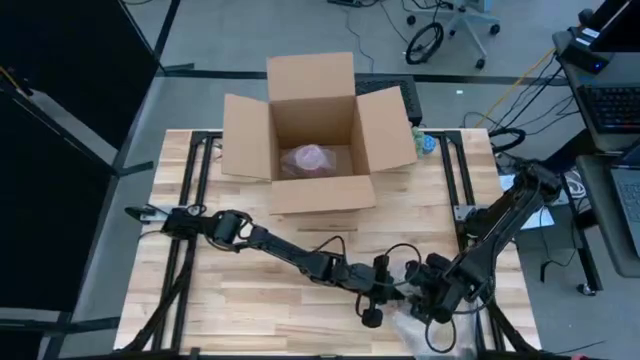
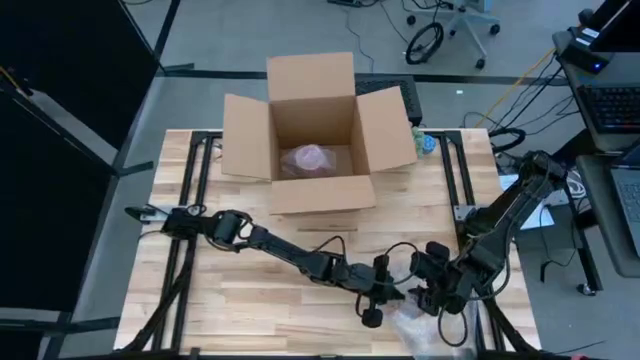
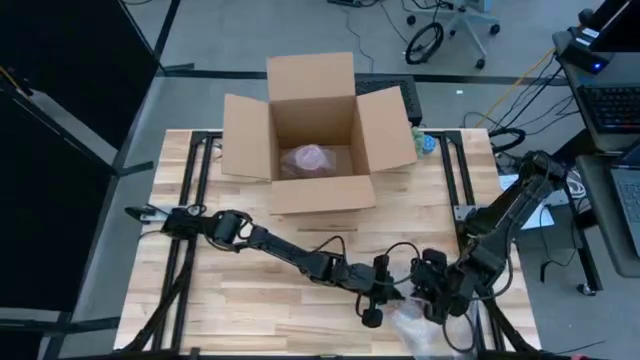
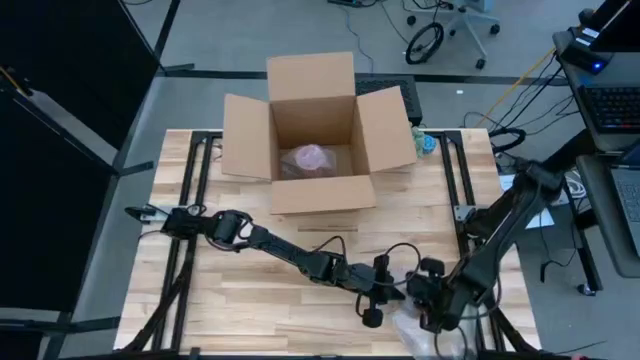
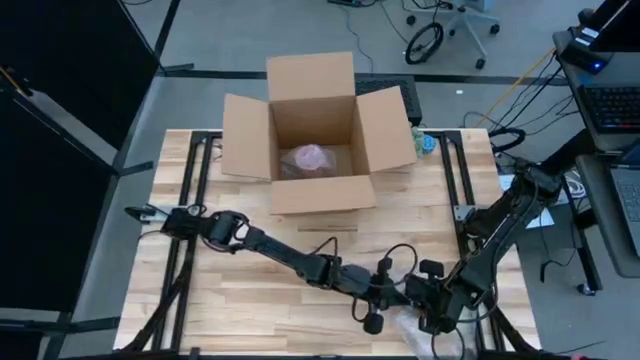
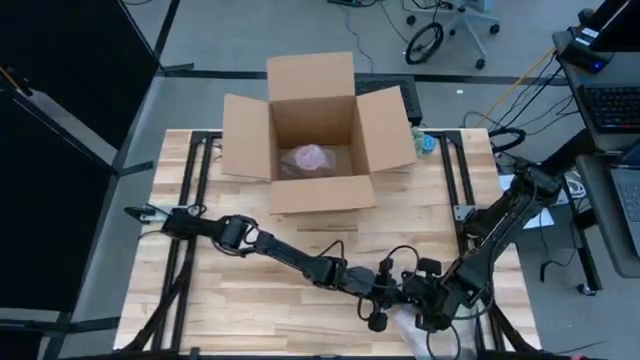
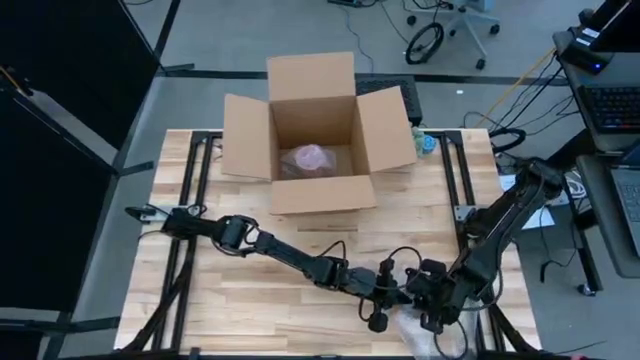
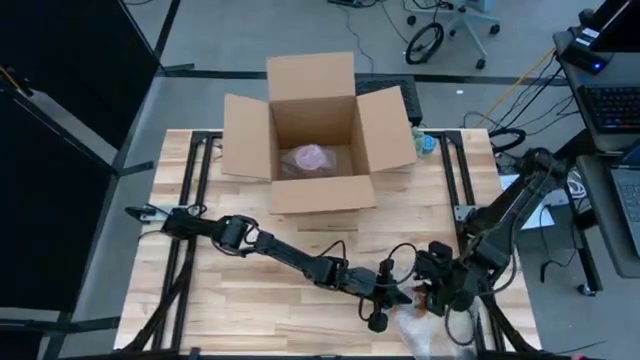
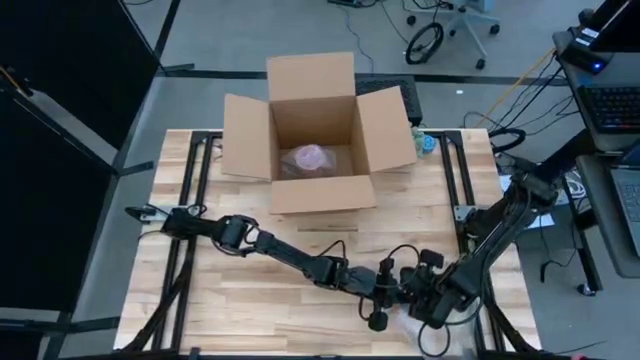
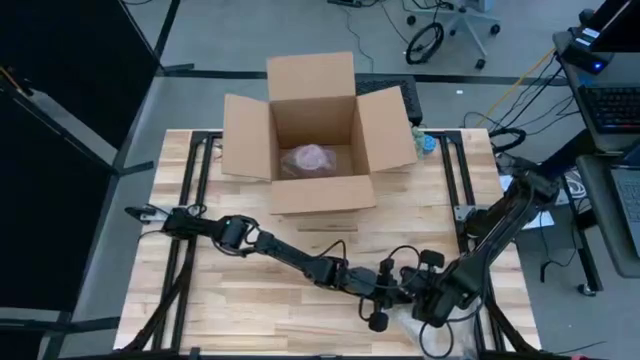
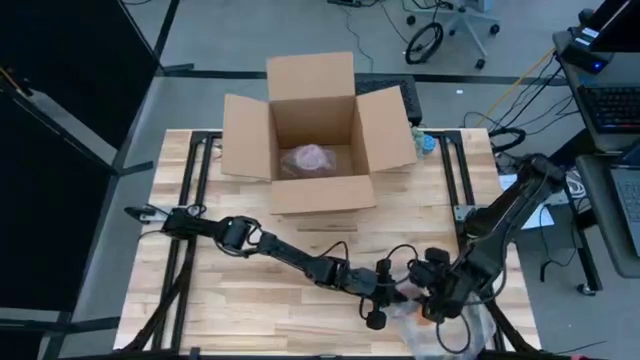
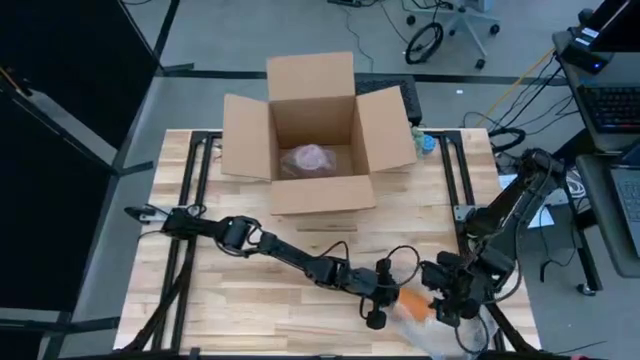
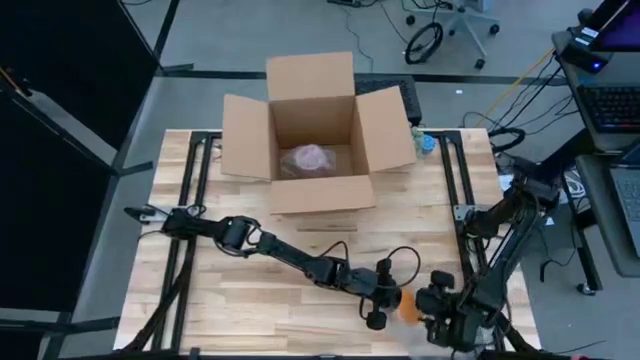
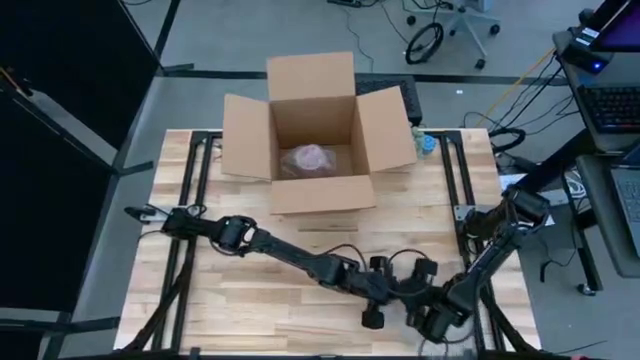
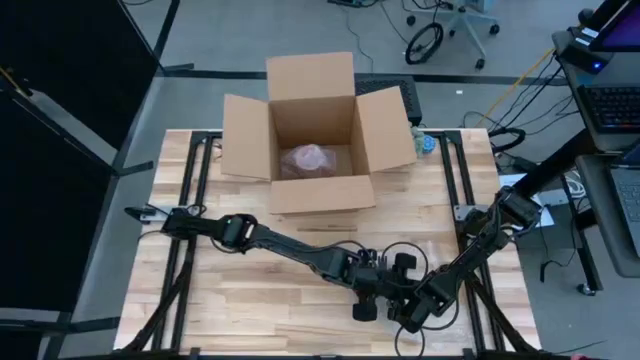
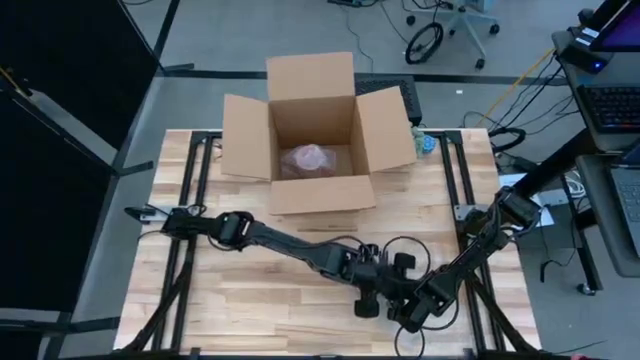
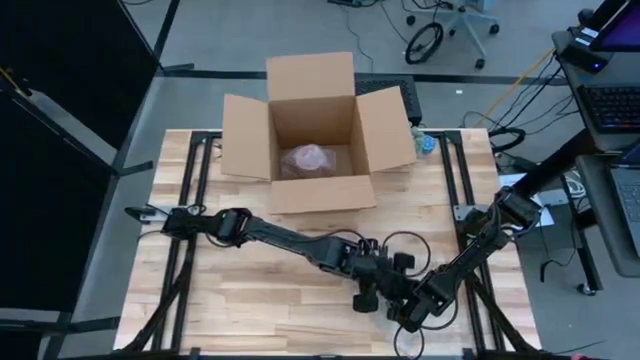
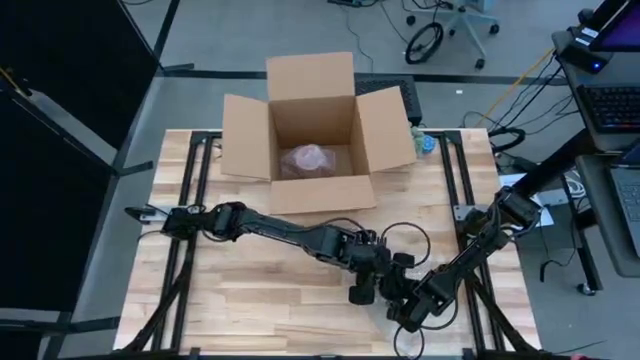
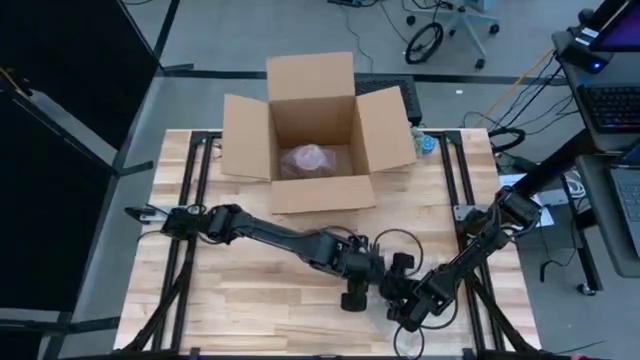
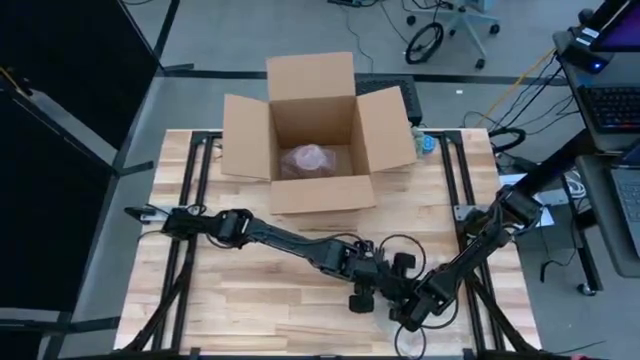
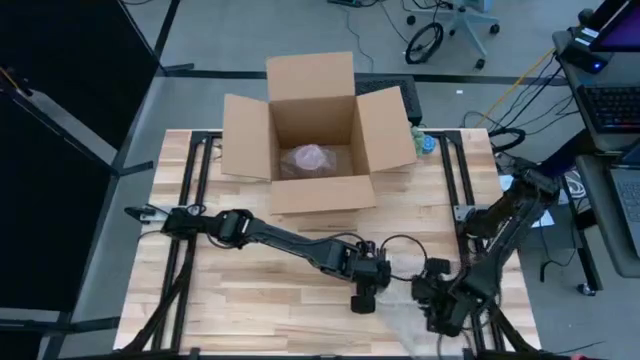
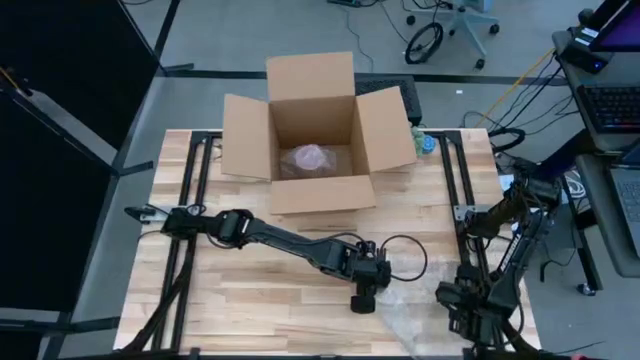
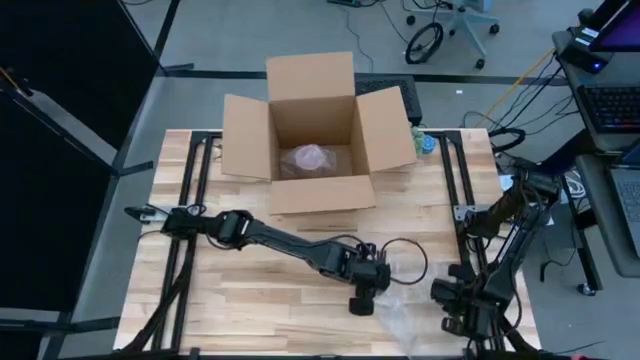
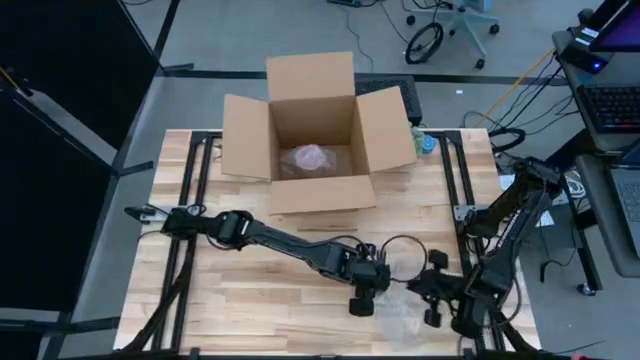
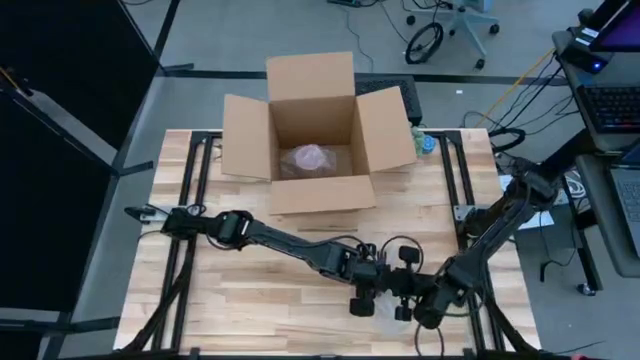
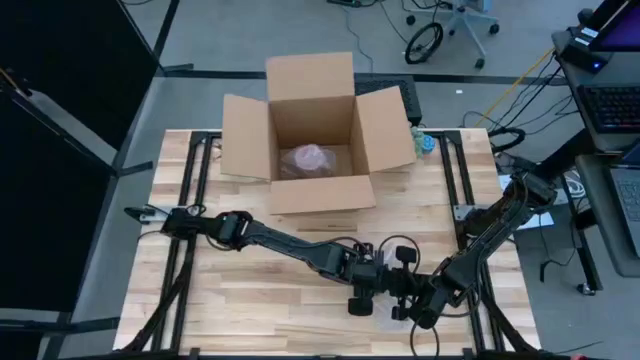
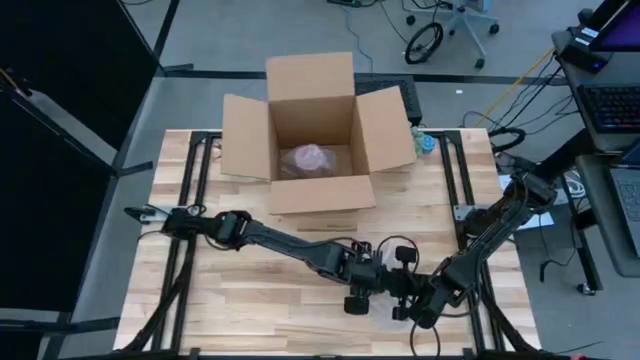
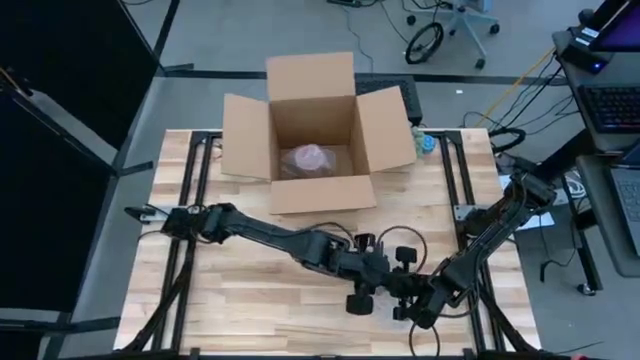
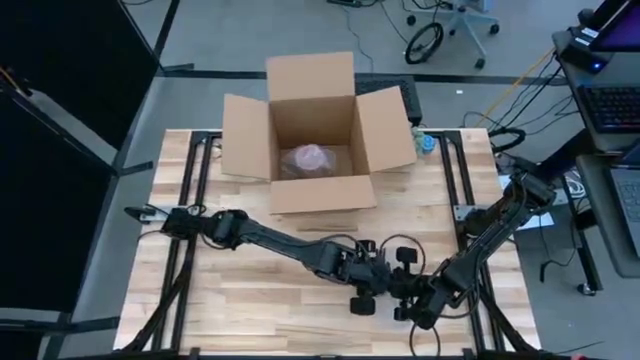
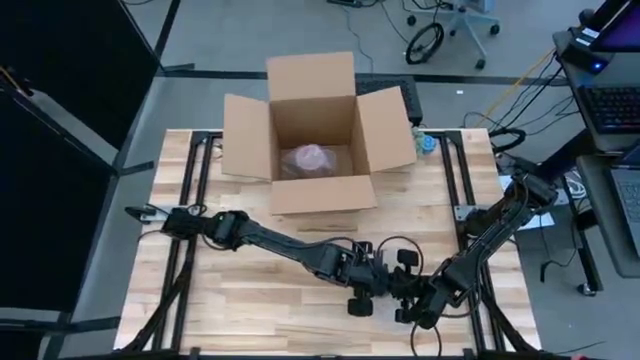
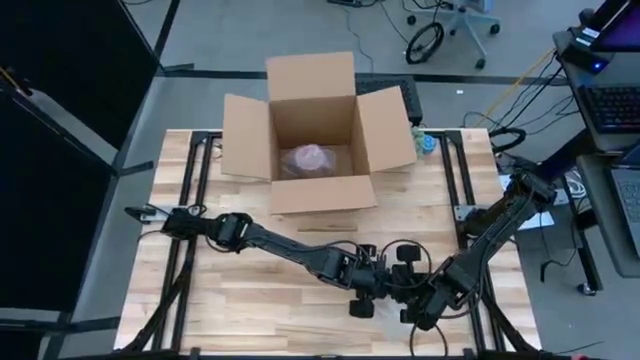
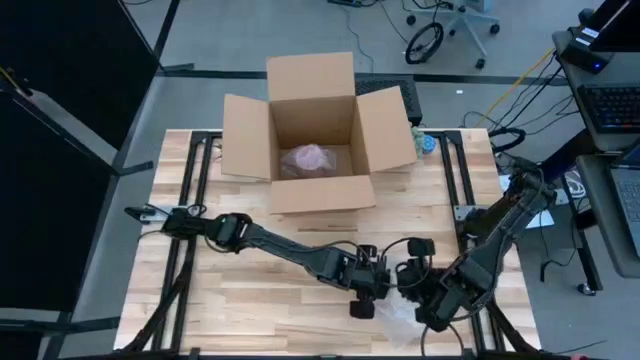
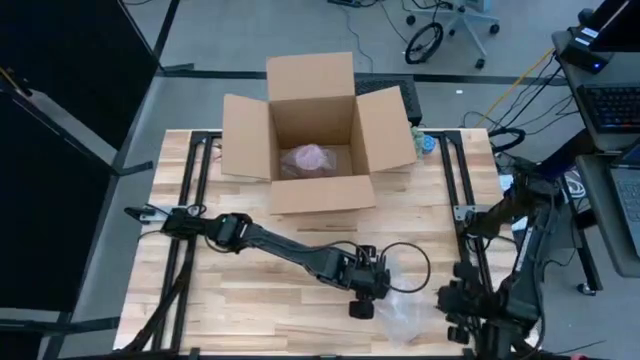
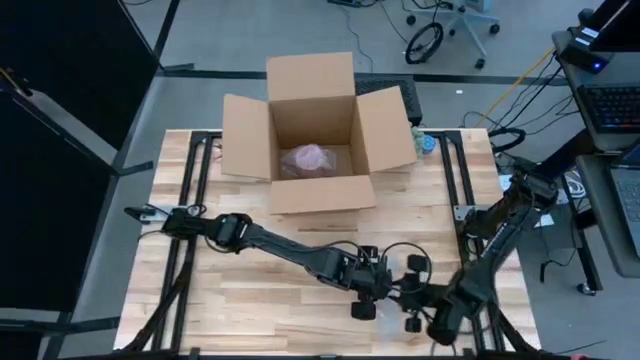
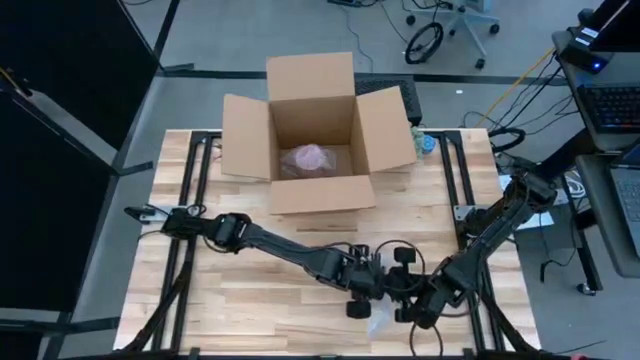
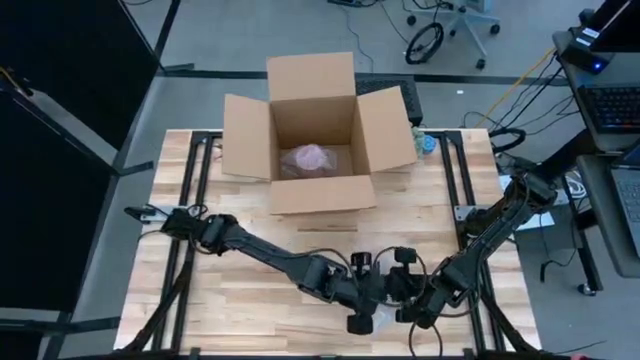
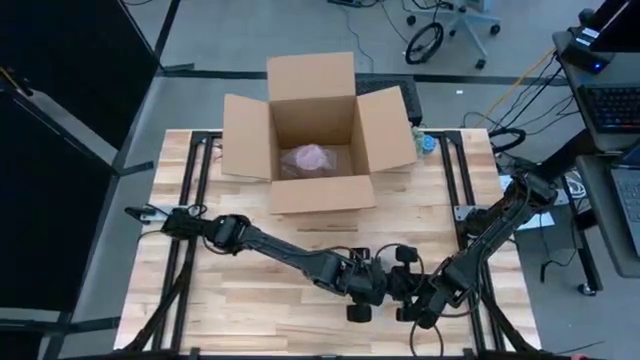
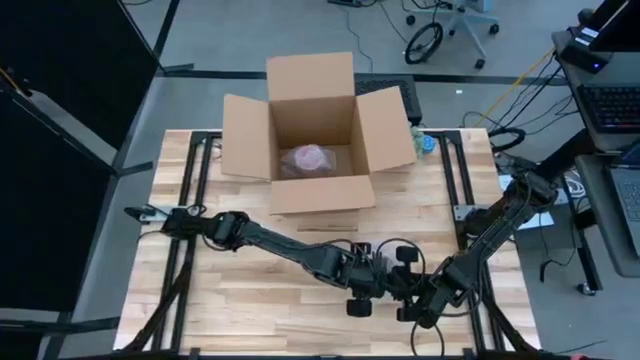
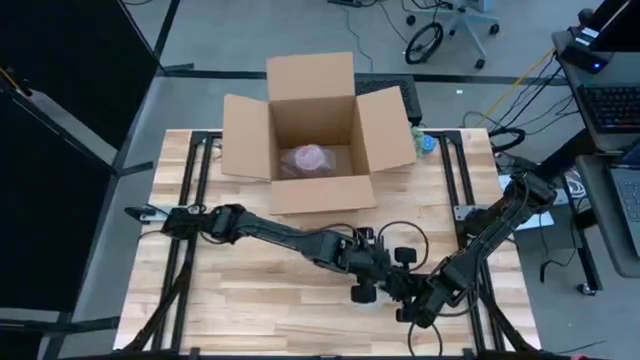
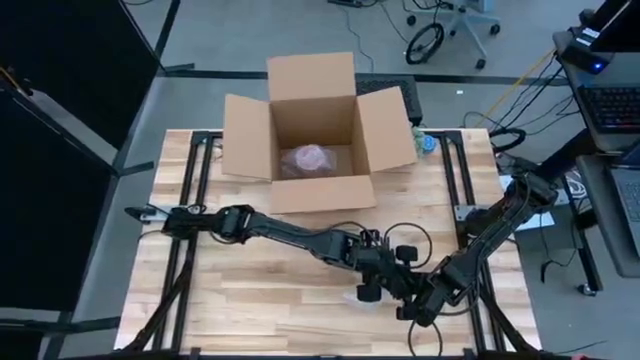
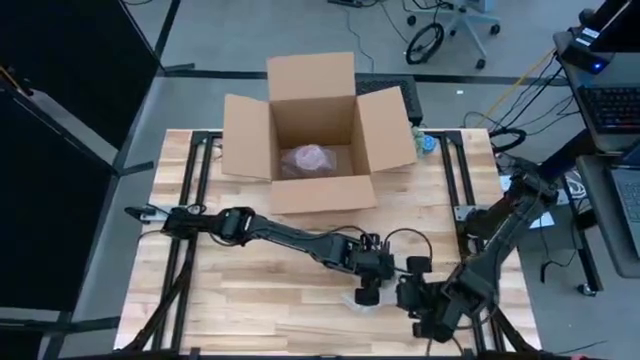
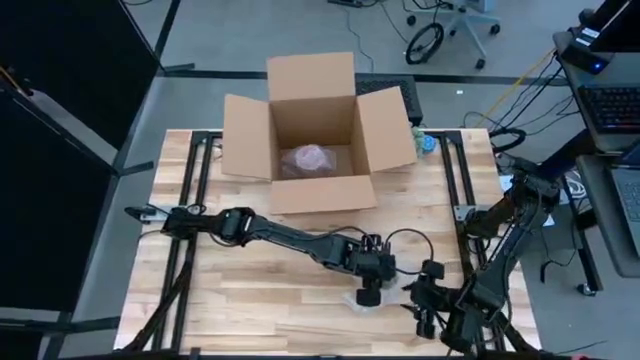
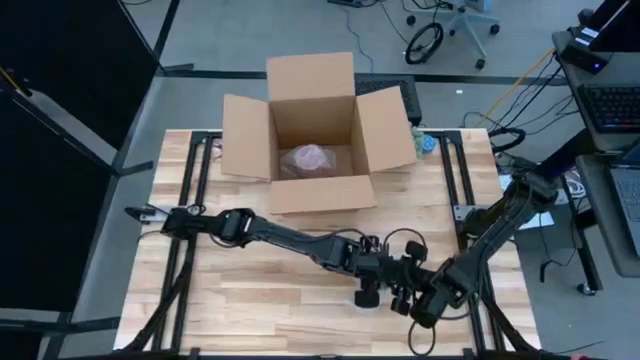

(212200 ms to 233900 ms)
Task: wrap mug
Wrap the pink mug with transparent bubble wrap
